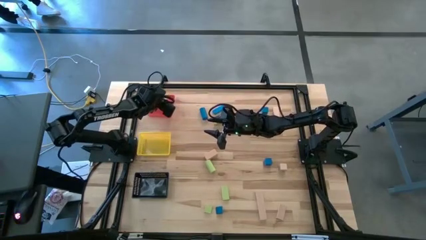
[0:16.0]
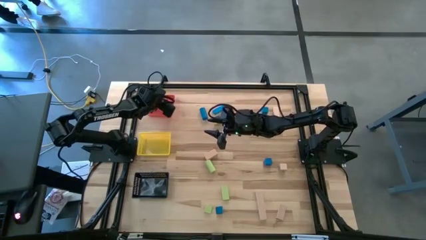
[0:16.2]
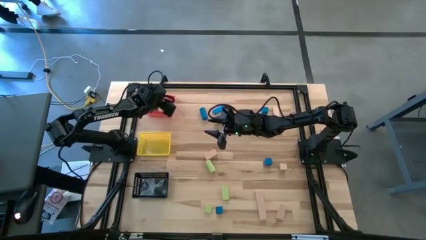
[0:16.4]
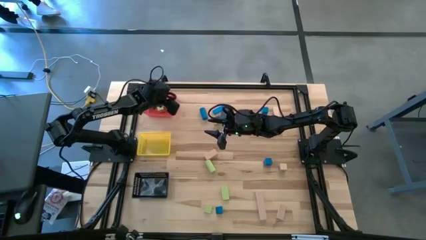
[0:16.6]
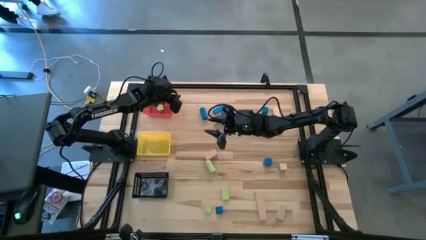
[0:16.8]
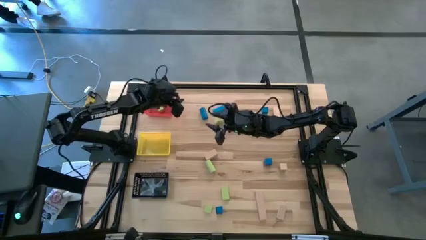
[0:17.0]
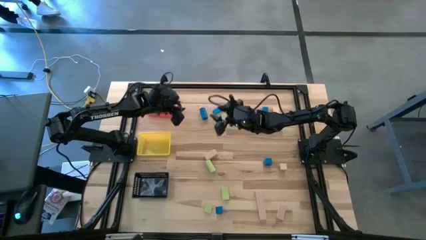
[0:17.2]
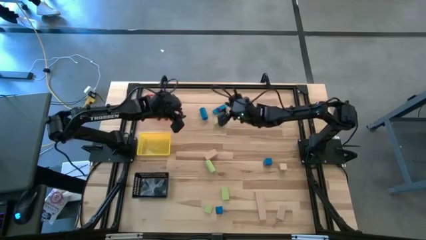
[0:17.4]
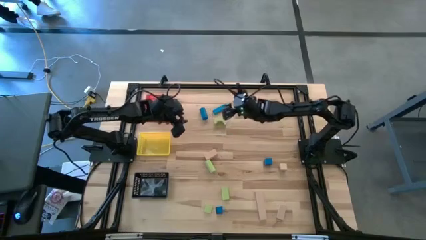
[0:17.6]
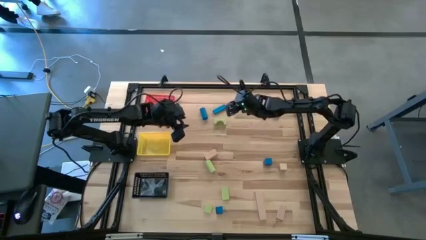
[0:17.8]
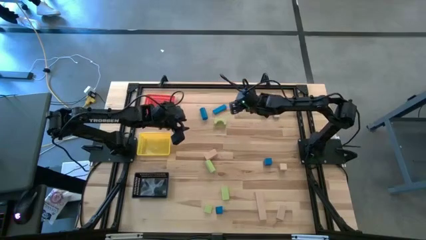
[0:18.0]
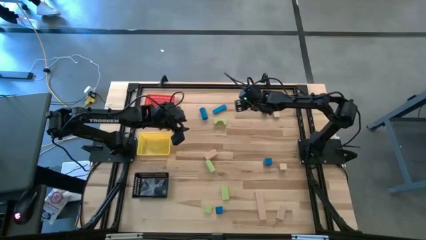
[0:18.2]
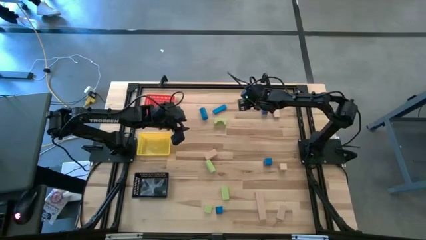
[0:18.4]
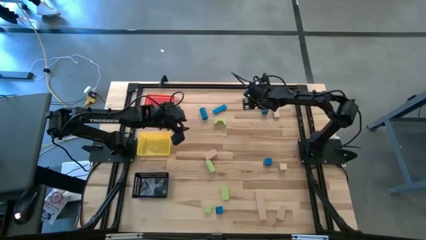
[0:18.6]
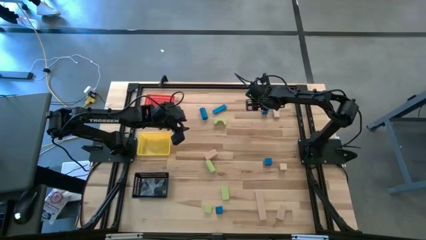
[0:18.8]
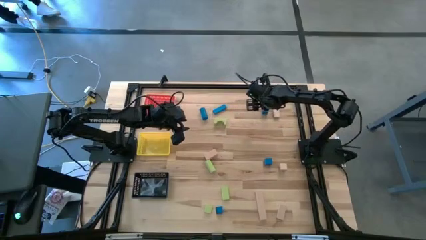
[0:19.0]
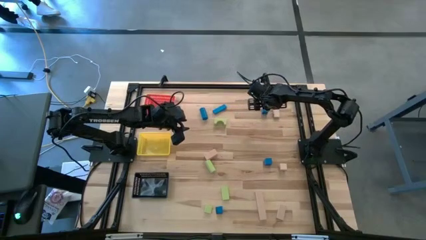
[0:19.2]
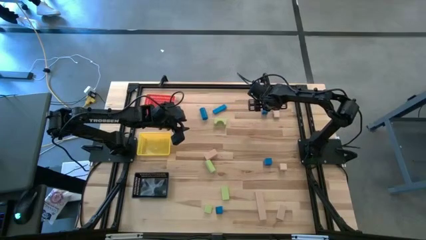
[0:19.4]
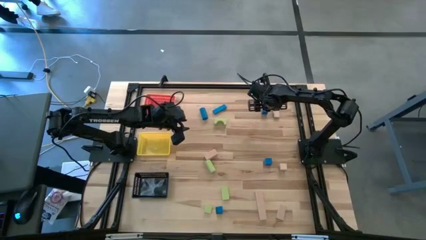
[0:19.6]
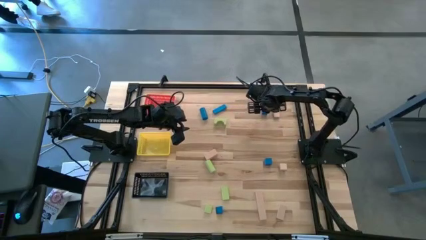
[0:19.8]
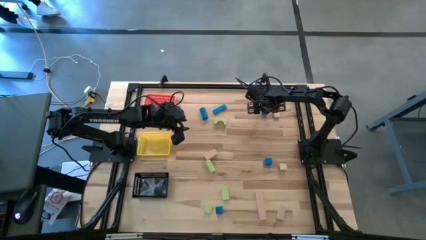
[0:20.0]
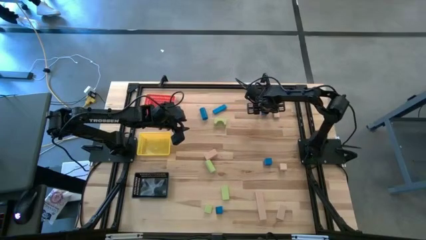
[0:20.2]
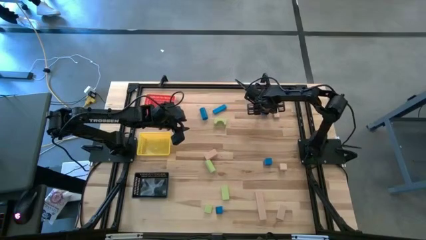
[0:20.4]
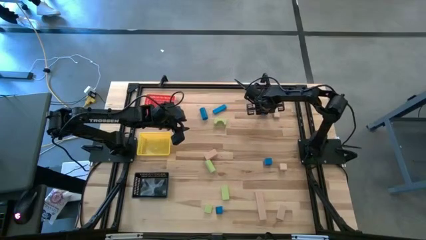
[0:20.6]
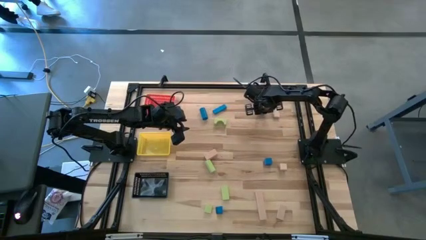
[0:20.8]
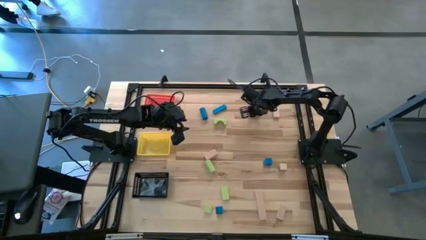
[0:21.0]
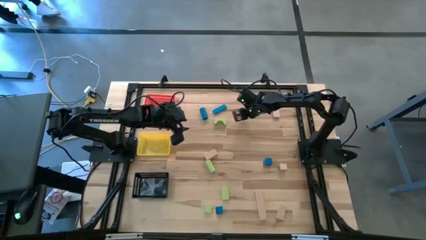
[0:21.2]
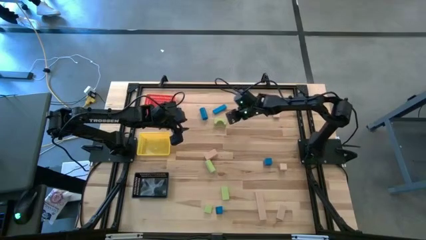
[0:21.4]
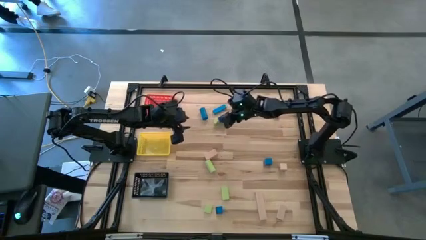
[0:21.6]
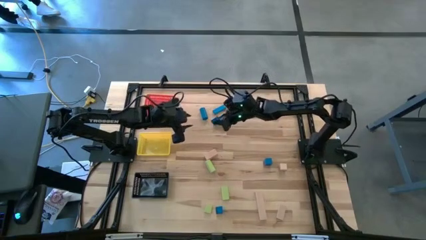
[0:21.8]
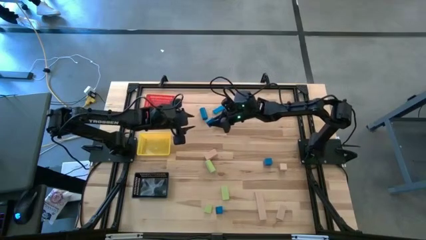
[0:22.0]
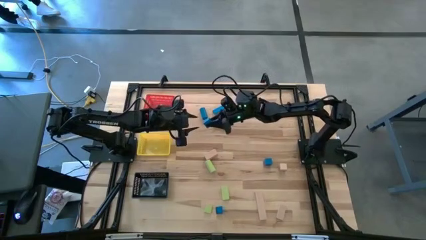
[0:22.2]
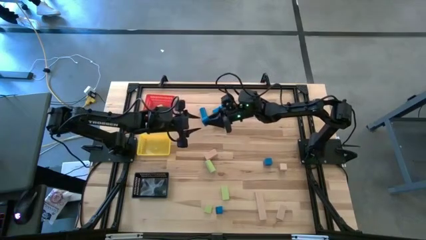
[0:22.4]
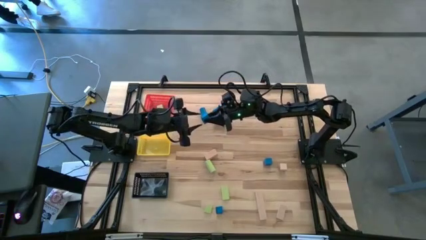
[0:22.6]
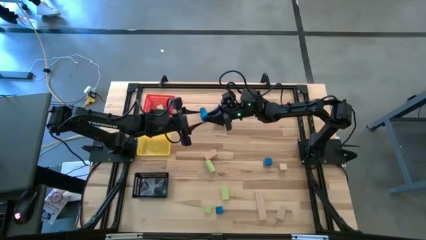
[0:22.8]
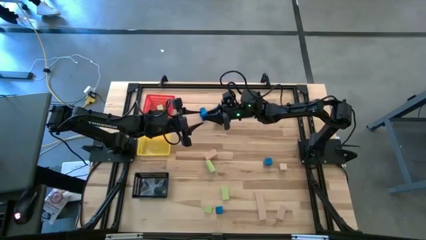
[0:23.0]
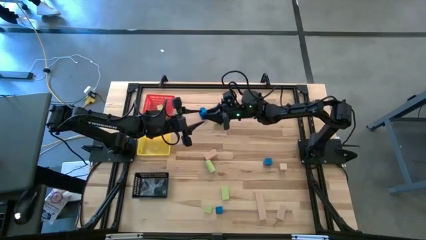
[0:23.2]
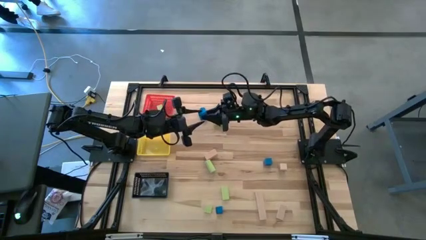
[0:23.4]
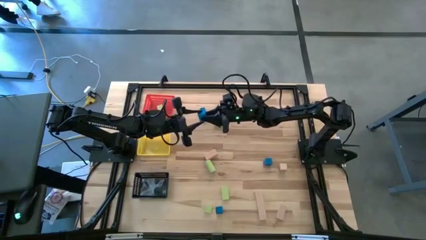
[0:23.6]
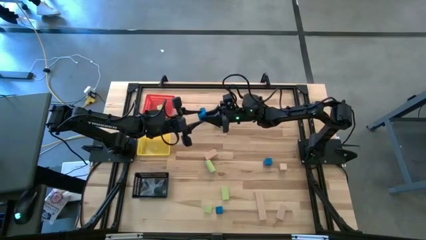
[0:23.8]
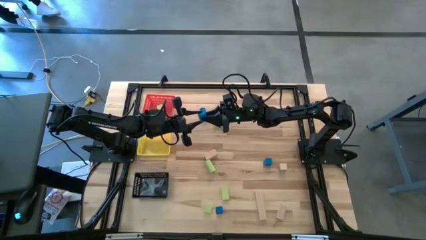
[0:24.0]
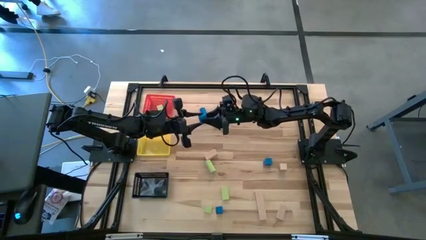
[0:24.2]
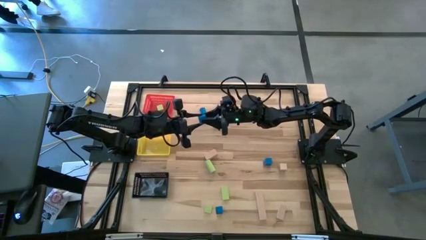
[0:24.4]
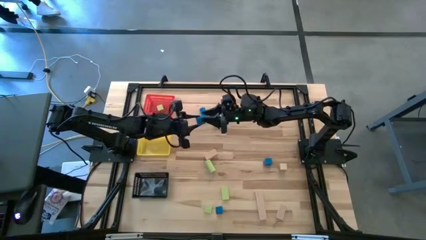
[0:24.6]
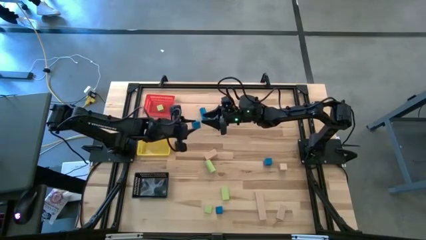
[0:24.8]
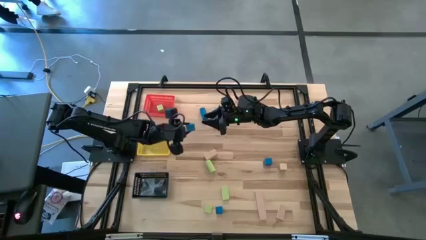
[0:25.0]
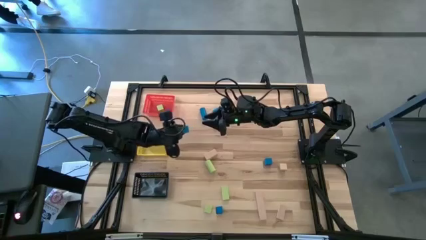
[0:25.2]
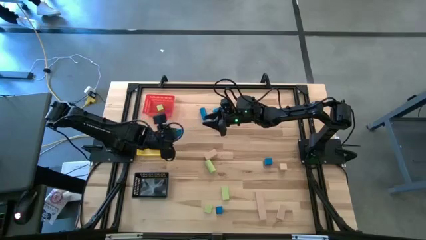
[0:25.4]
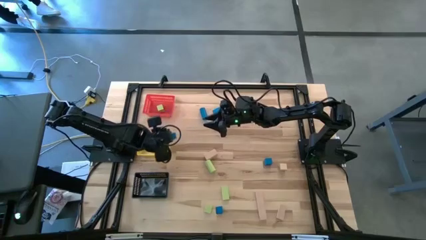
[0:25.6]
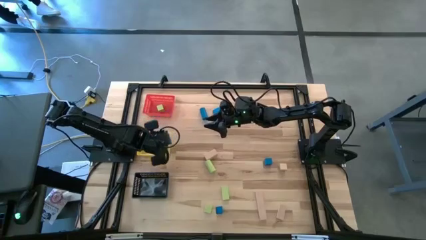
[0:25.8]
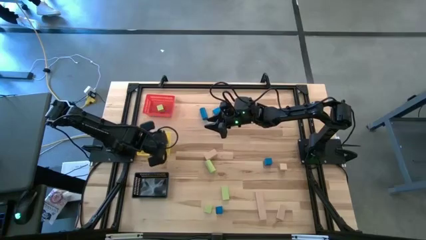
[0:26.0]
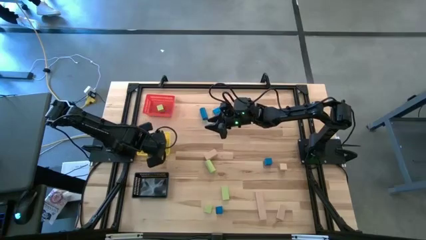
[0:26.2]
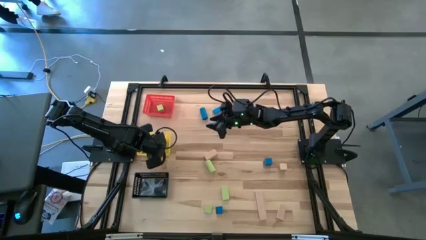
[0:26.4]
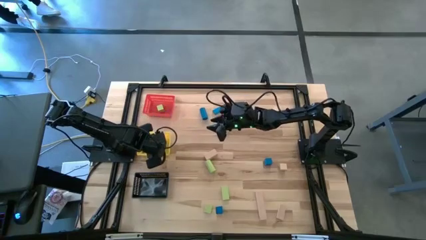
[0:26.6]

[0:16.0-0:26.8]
Task: Sort & place blocks by color
Put the rectangular blue block into the yellow basket

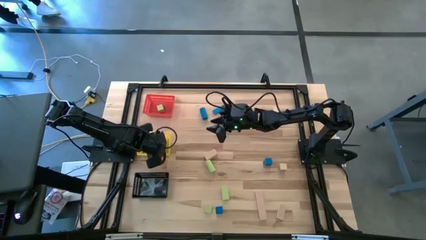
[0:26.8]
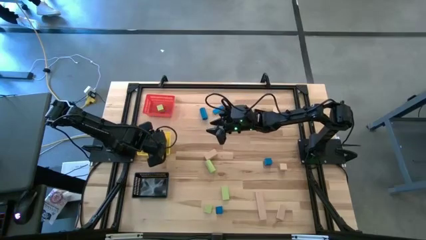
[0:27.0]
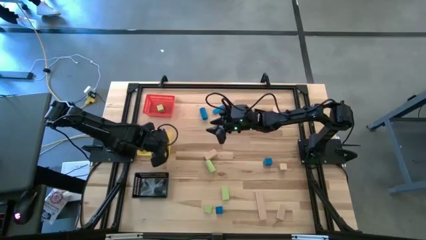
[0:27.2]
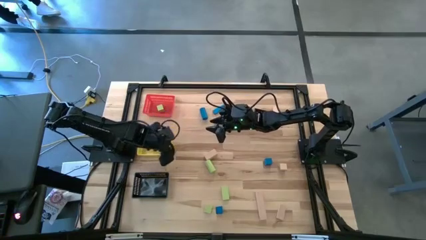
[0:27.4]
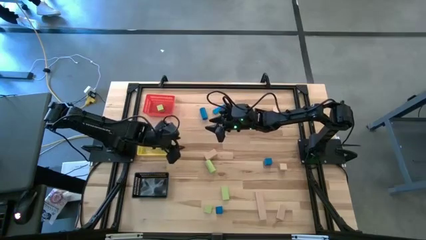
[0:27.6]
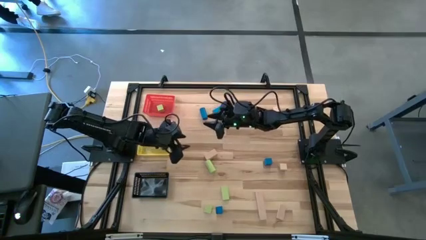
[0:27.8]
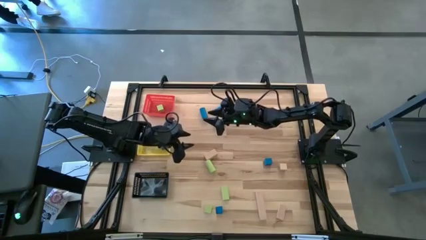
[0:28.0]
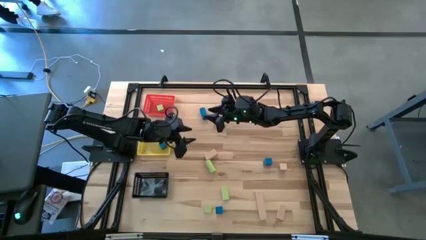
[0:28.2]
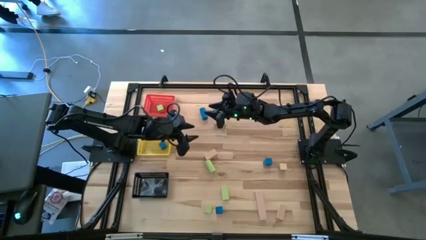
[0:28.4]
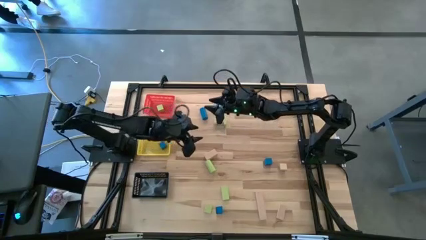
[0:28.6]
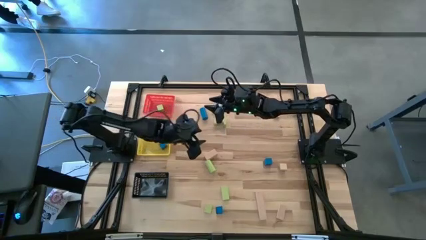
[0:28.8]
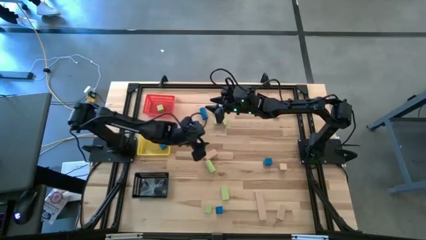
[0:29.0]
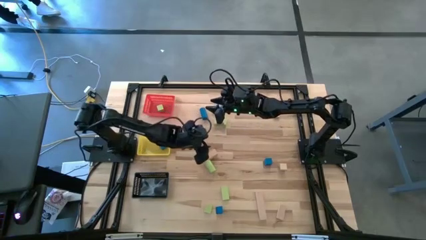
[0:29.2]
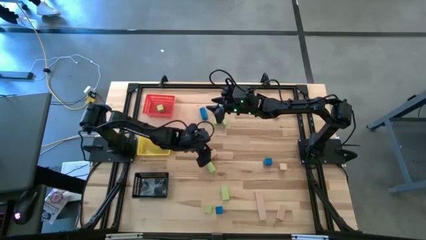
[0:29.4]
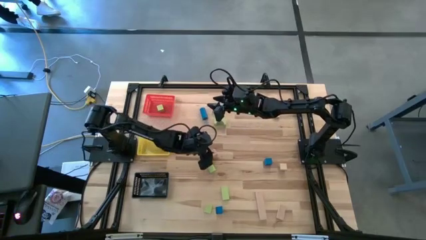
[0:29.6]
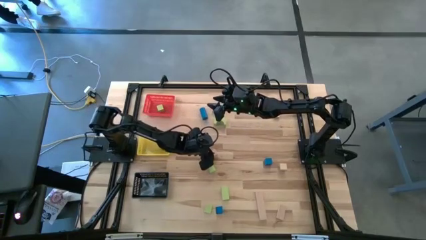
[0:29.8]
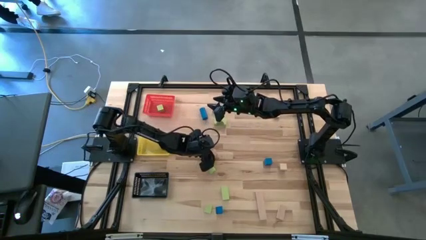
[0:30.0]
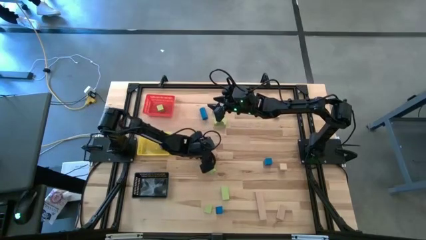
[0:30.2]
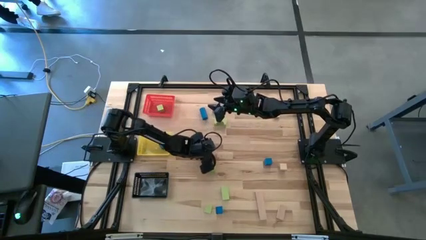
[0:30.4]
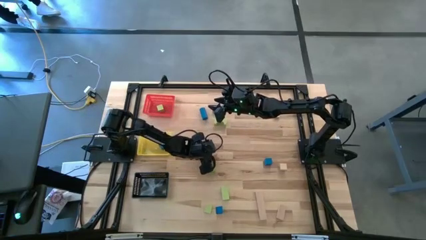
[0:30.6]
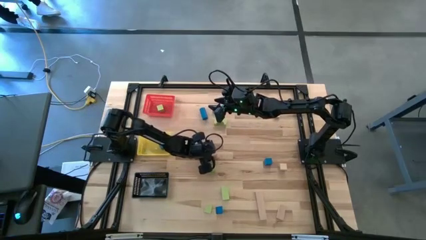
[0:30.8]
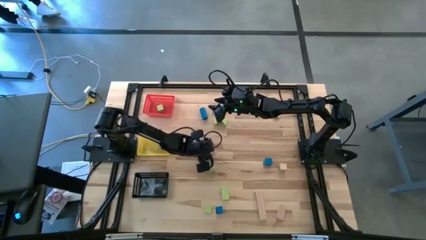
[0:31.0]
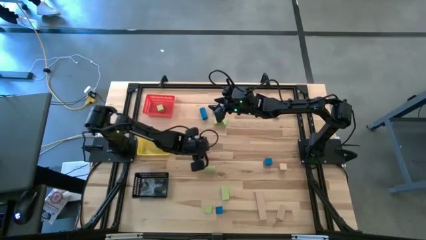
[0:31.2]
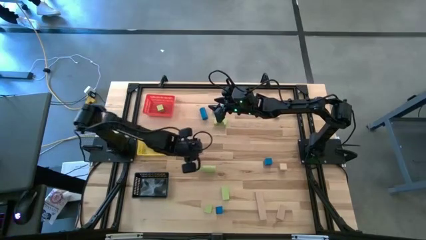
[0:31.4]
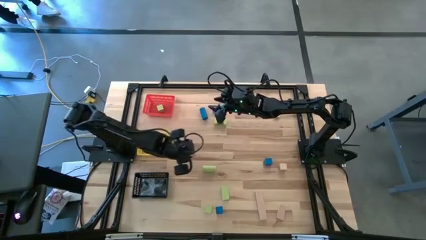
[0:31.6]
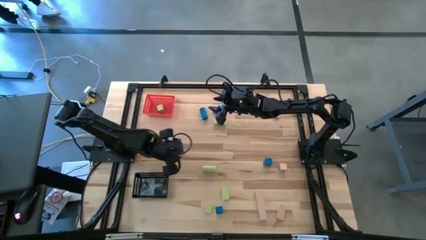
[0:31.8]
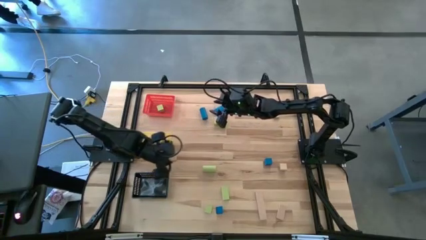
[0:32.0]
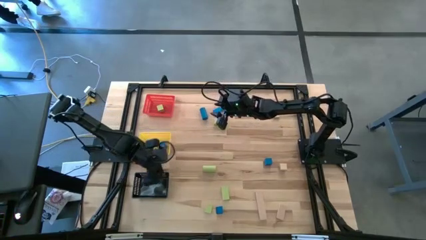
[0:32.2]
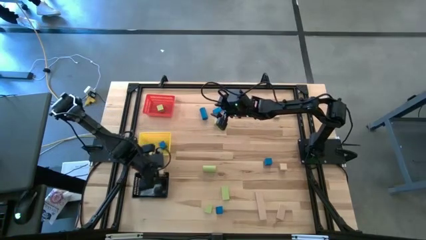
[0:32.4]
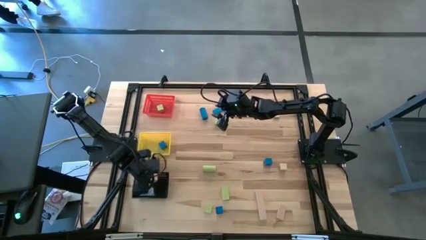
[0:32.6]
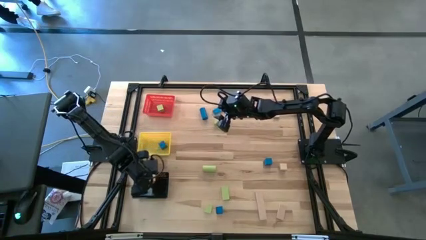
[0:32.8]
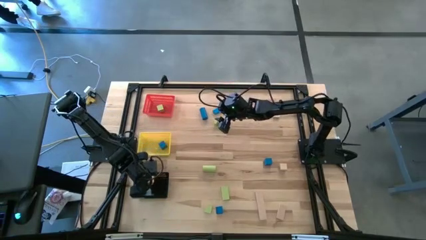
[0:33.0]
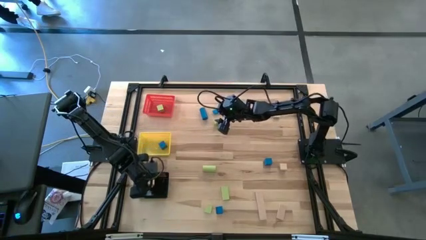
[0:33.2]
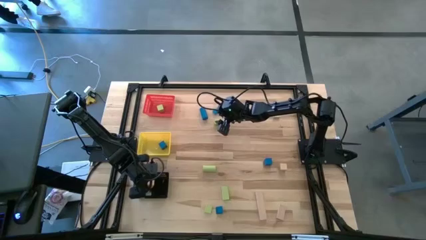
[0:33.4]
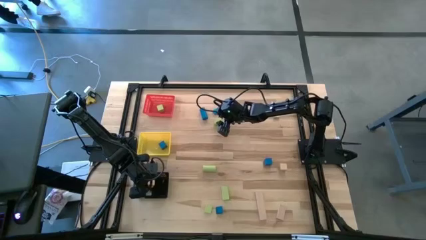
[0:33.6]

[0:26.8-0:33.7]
Put the top rectangular wooden block into the black basket
